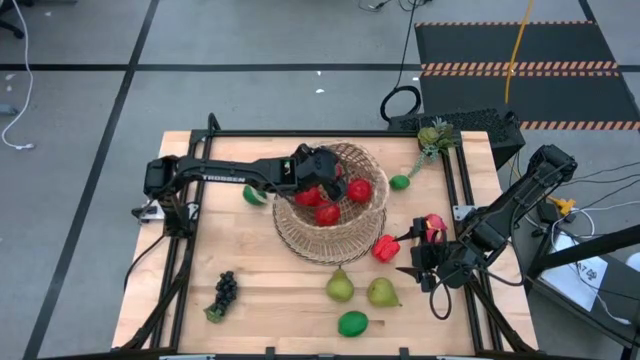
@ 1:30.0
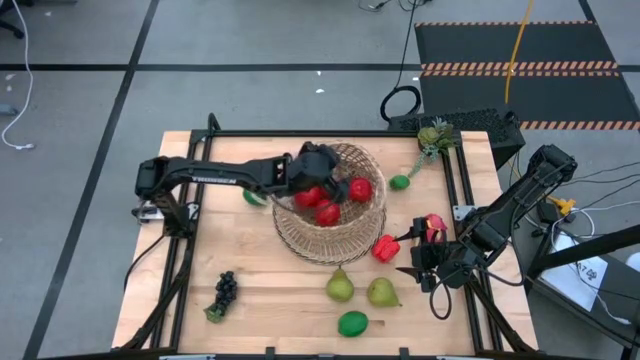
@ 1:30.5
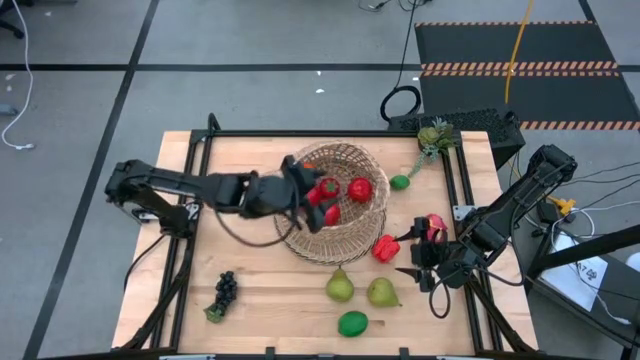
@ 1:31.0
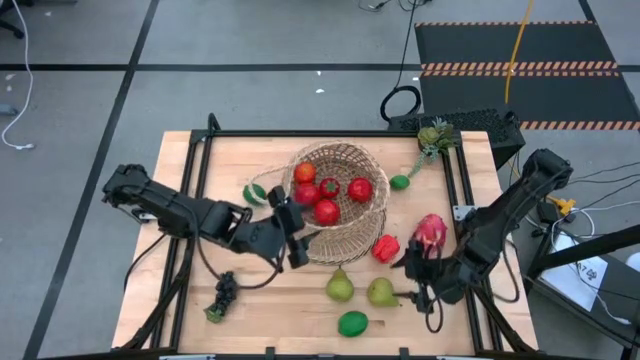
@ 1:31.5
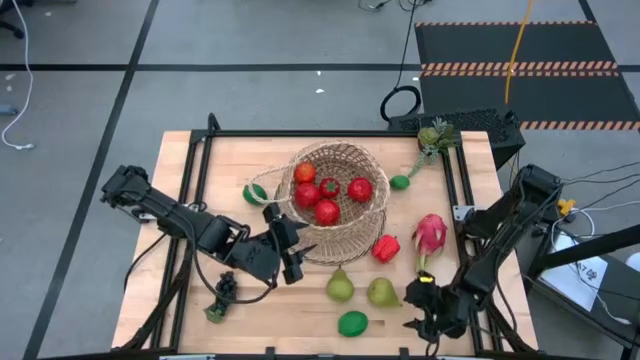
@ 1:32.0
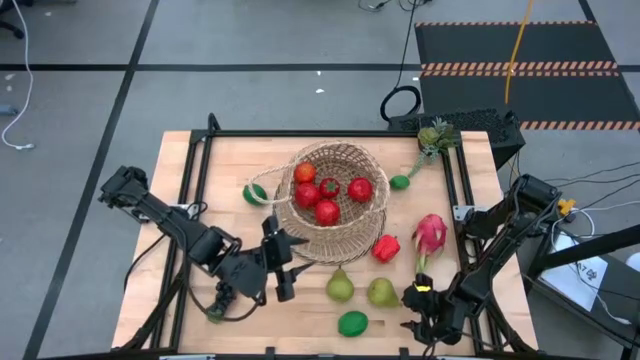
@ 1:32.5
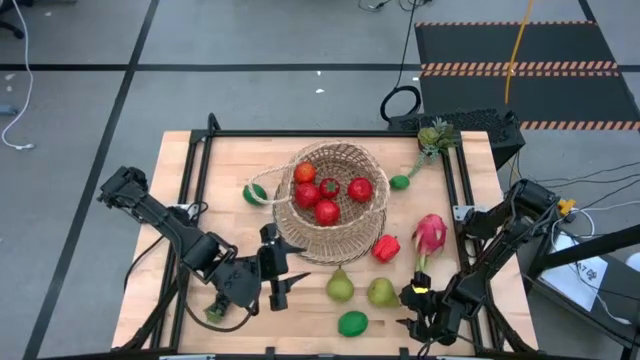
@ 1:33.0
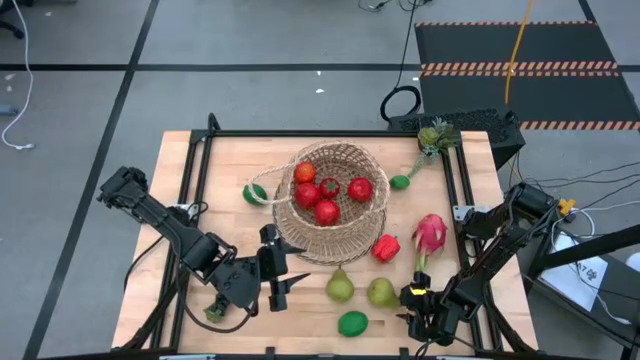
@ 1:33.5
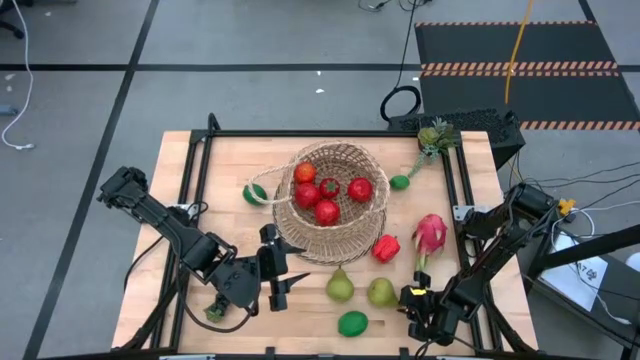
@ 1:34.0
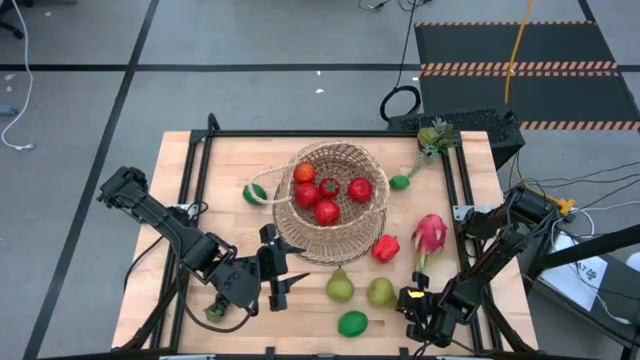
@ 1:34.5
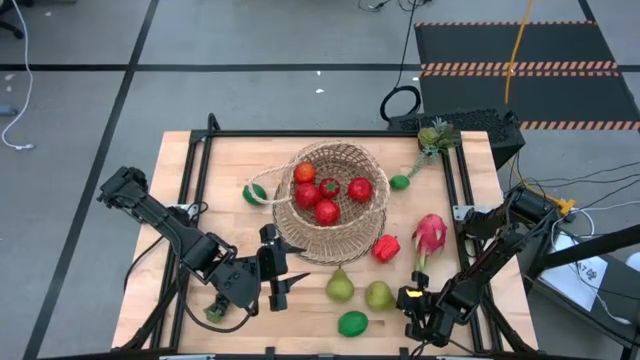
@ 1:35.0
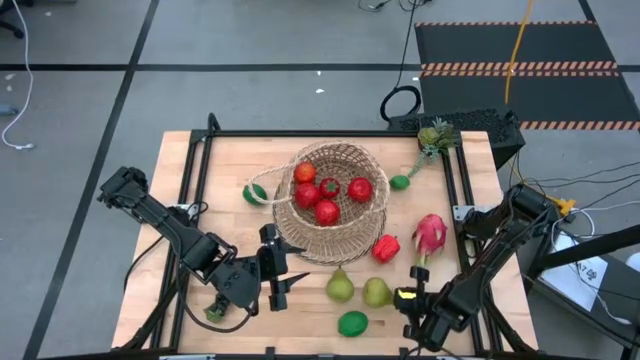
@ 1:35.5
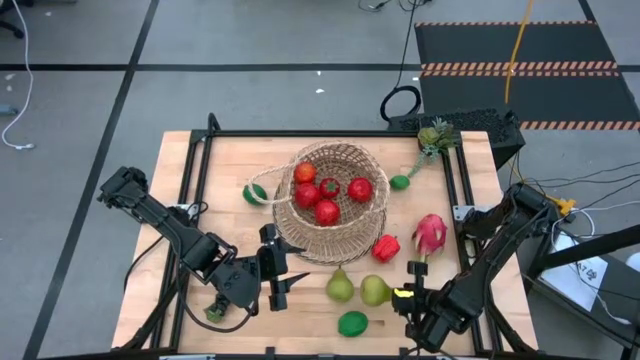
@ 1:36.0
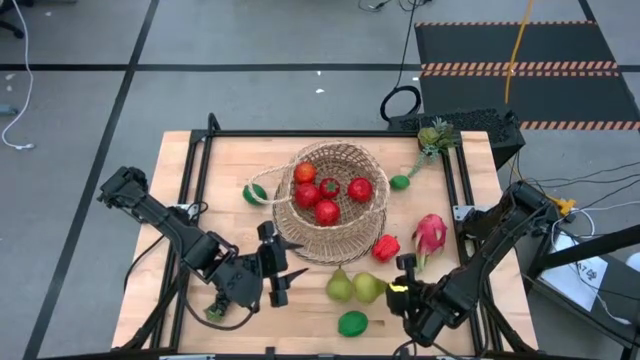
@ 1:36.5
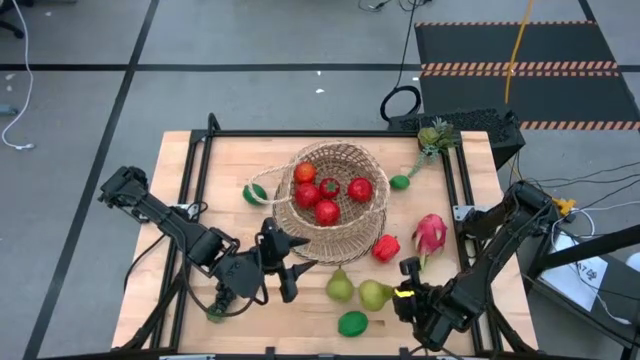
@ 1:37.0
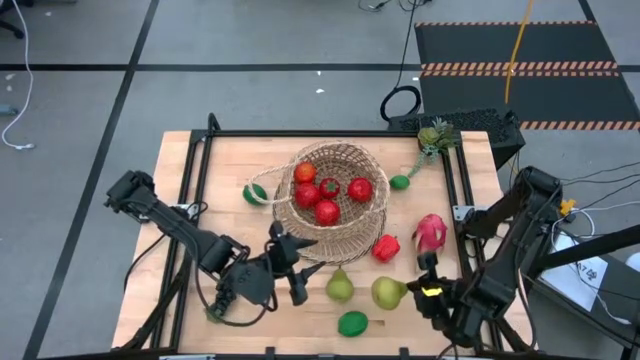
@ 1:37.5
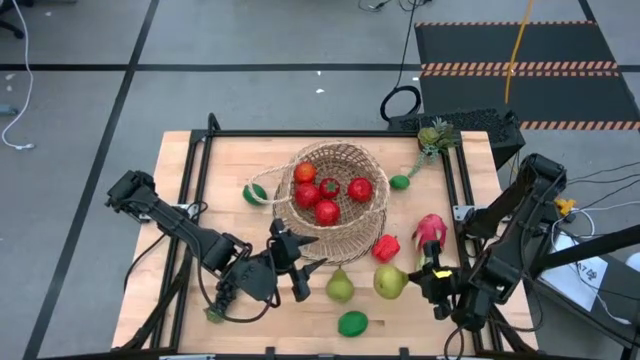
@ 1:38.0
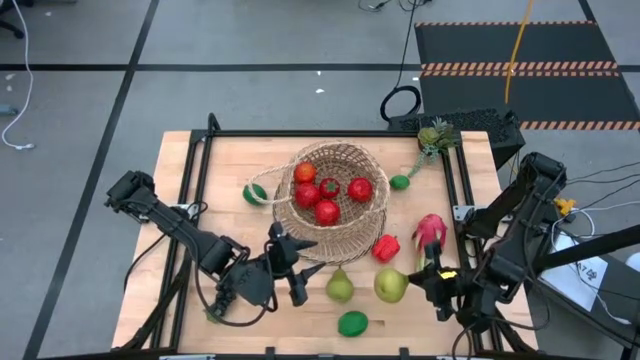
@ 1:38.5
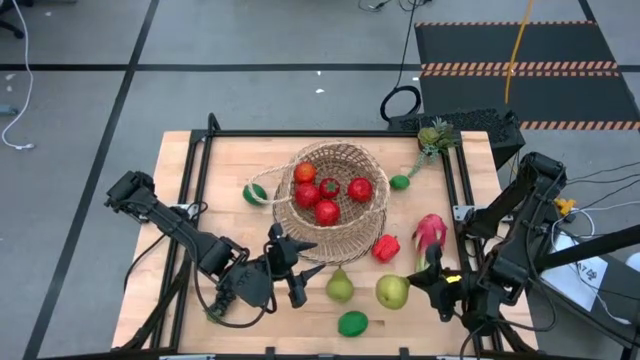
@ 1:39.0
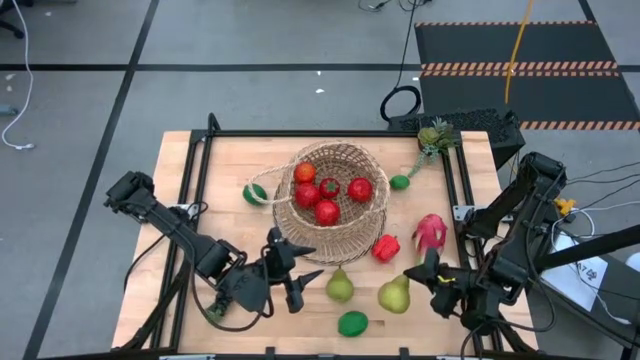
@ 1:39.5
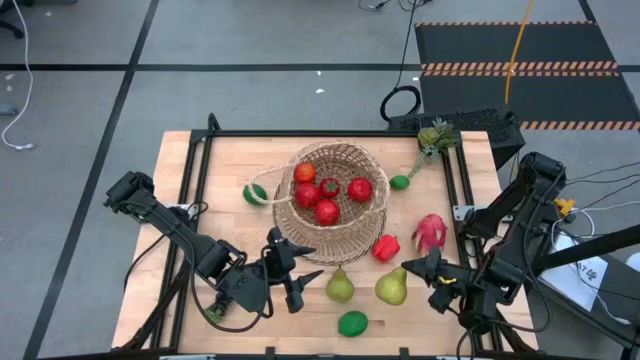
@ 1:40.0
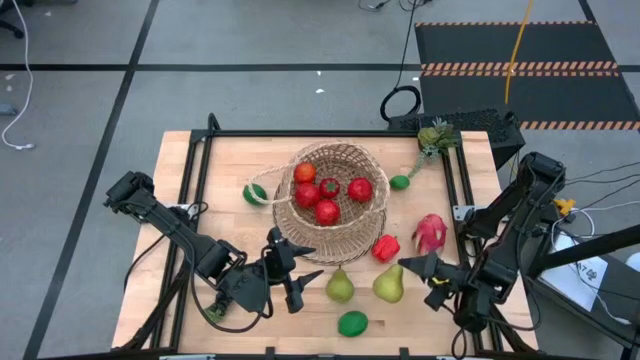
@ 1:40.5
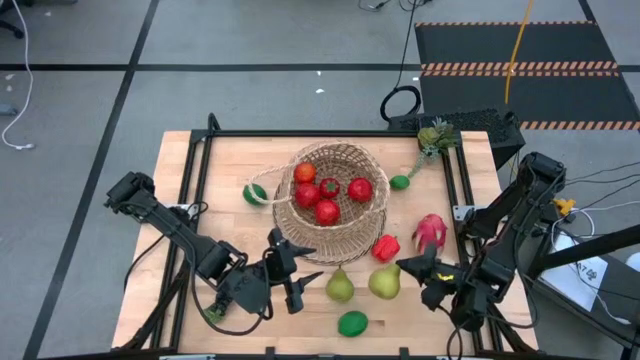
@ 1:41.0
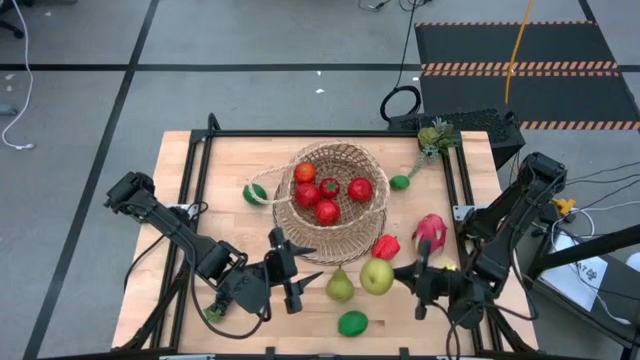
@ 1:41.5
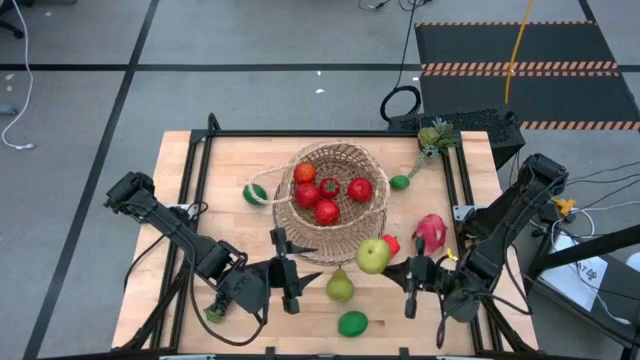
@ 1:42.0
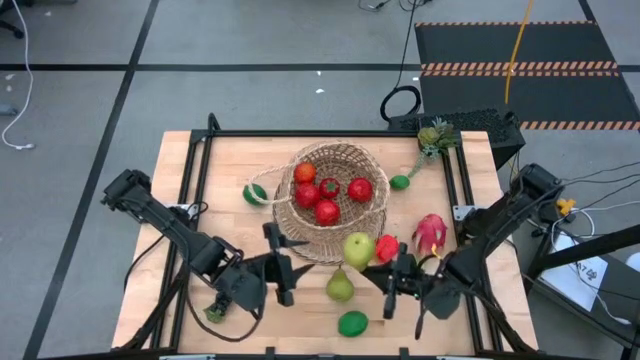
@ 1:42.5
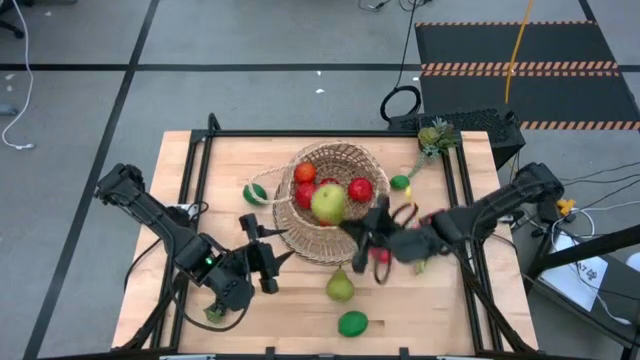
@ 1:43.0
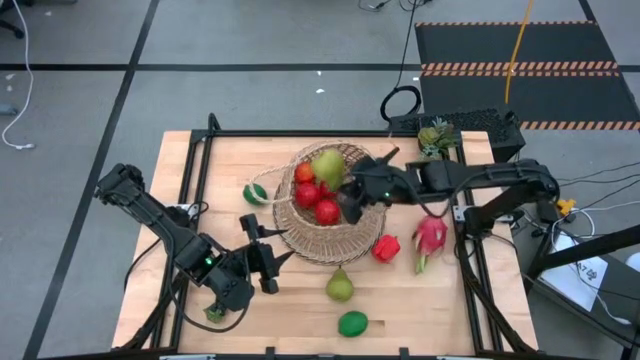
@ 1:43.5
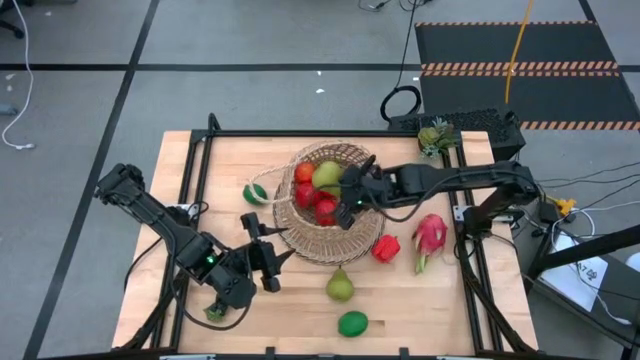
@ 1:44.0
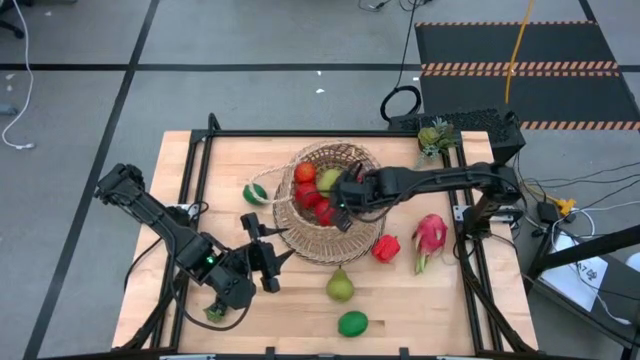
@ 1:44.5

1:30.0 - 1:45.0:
Task: Build produce basket
Put the right green pear into the basket

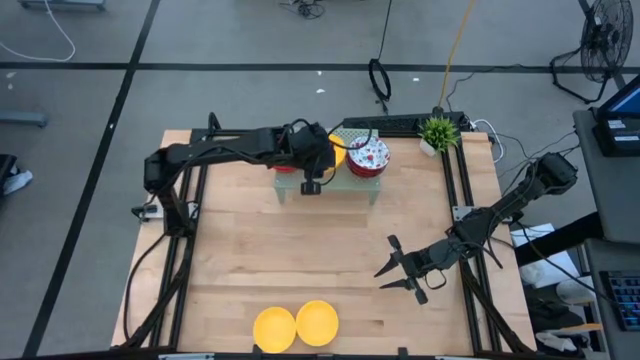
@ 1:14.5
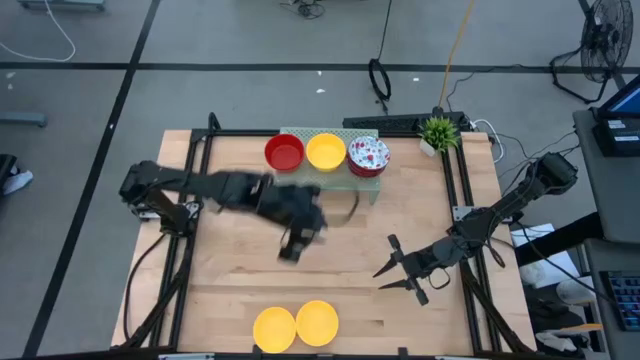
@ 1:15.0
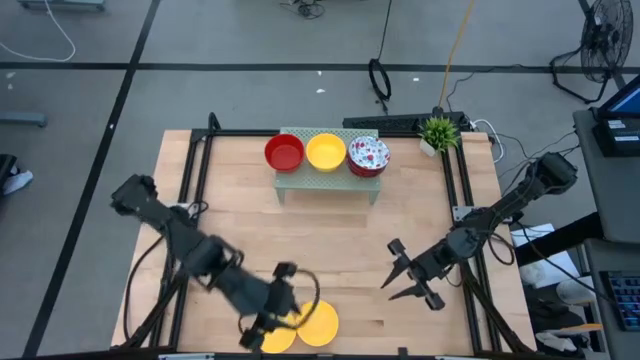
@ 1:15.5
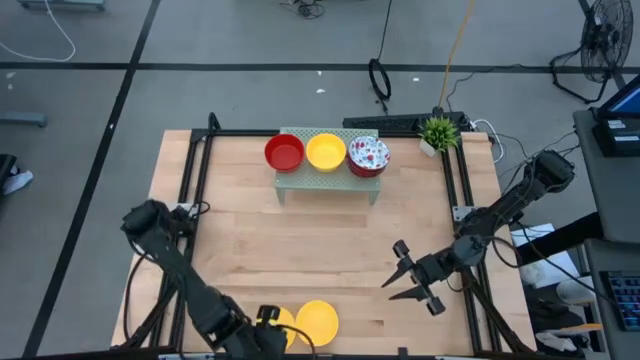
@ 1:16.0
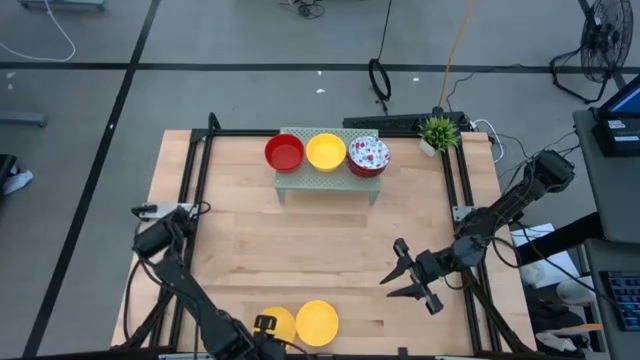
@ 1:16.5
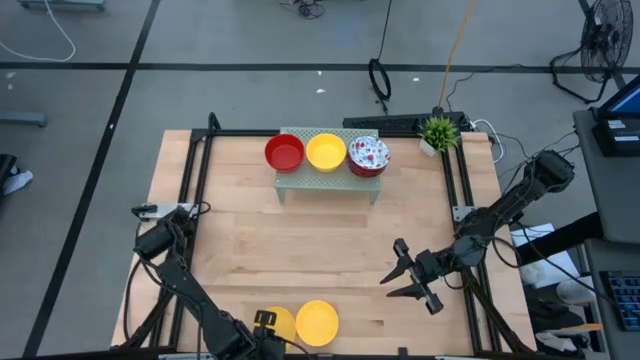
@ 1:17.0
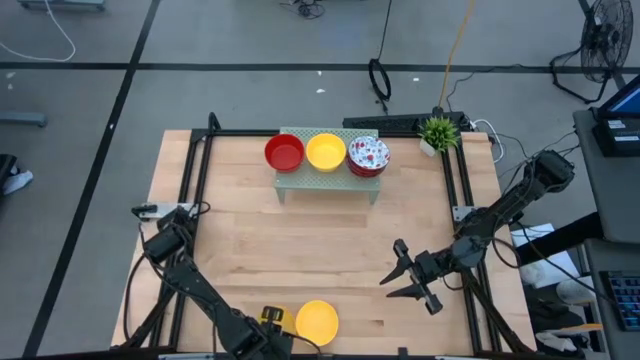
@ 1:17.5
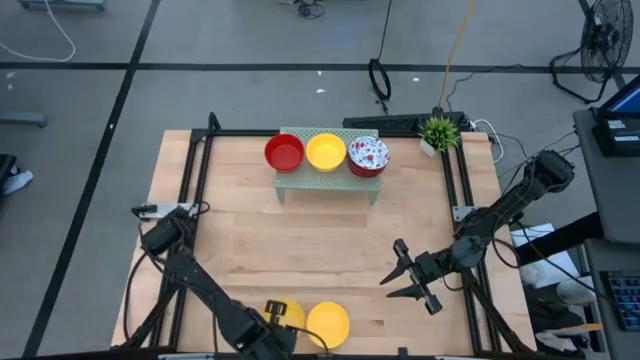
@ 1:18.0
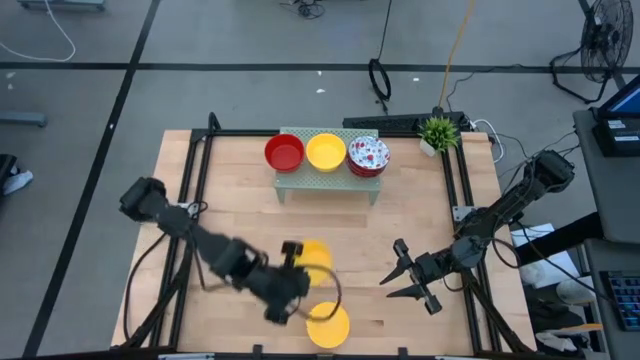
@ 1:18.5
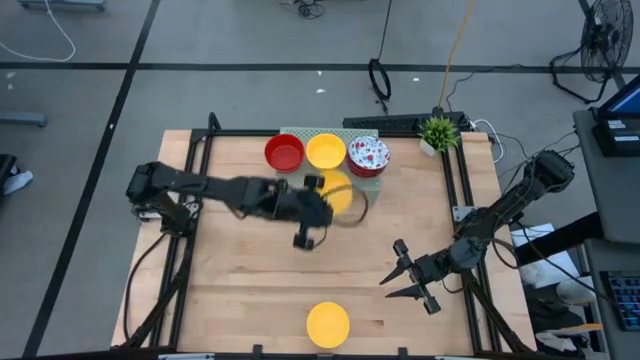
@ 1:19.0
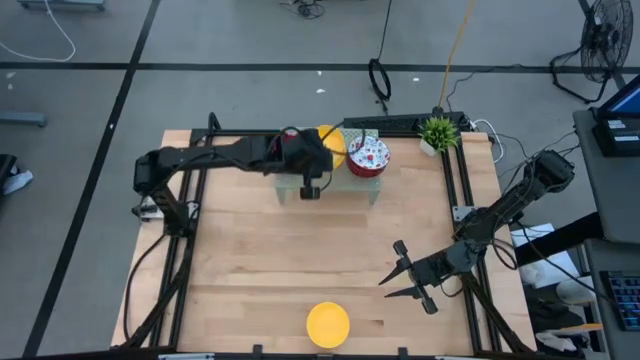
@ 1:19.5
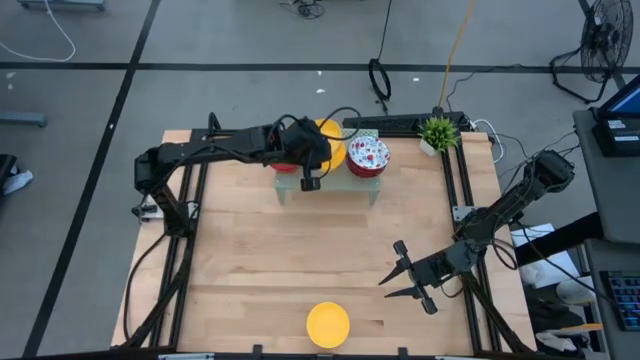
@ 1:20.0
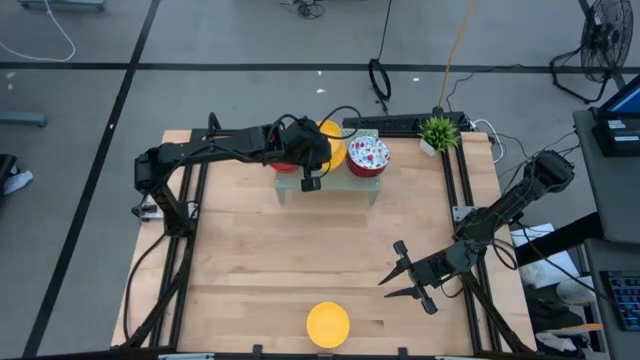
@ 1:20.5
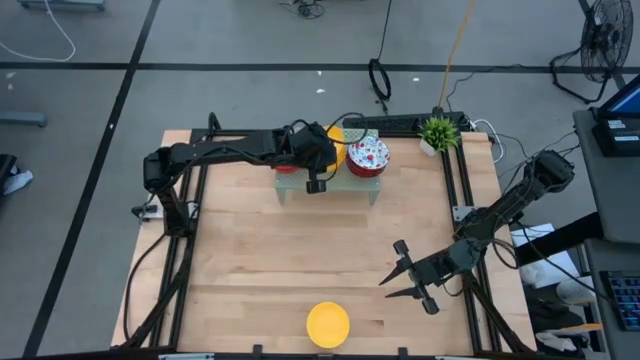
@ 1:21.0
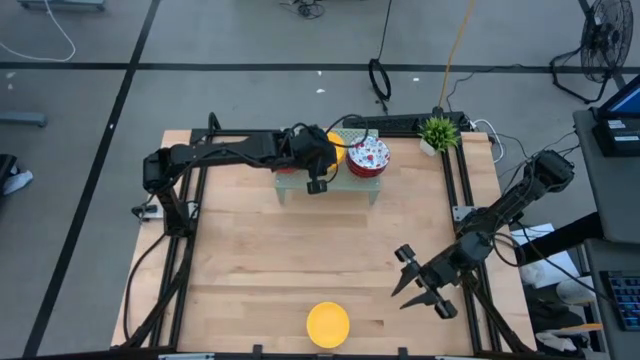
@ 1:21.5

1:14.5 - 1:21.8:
Task: Pick & Place Mini bowls
Stack the yellow bowl on the yellow bowl on the shelf
